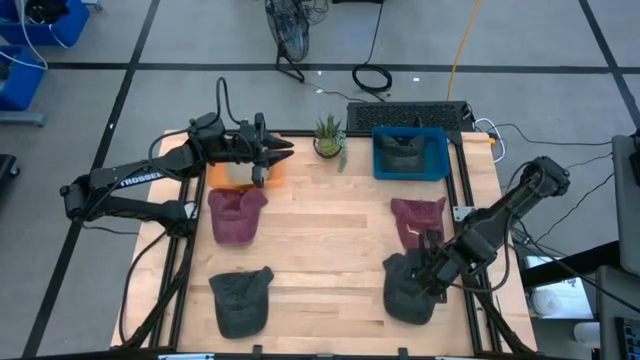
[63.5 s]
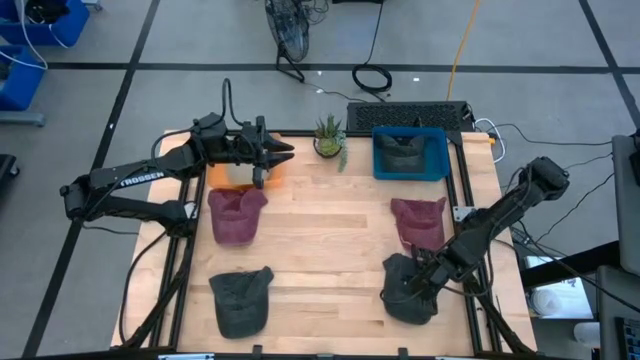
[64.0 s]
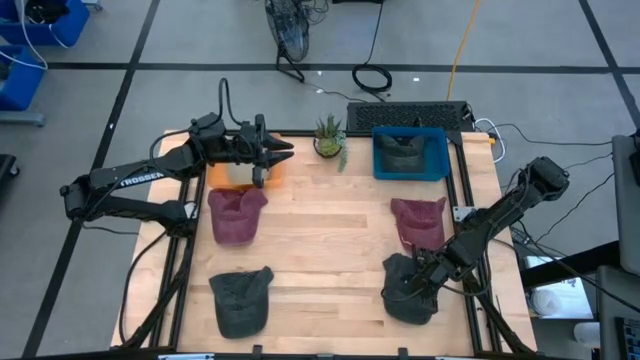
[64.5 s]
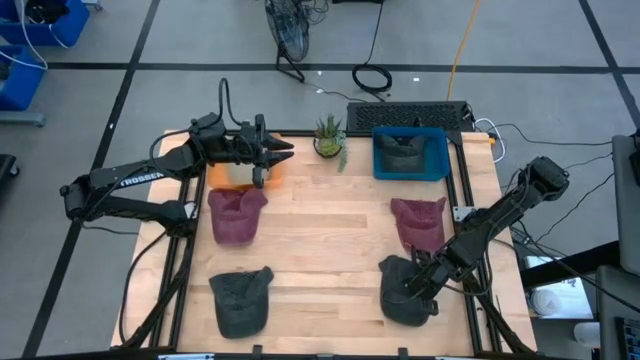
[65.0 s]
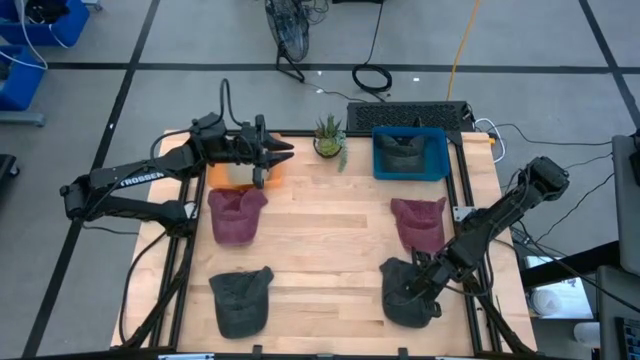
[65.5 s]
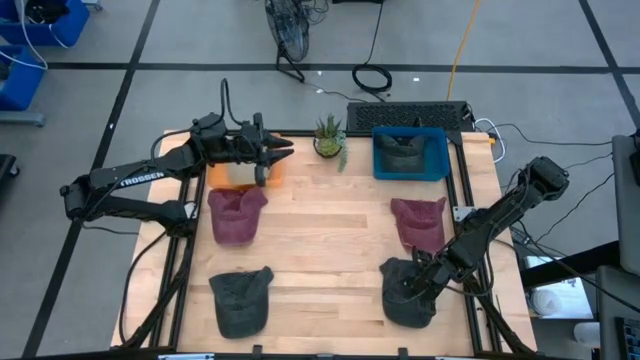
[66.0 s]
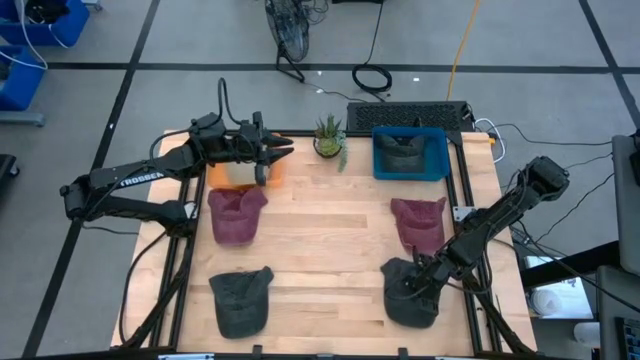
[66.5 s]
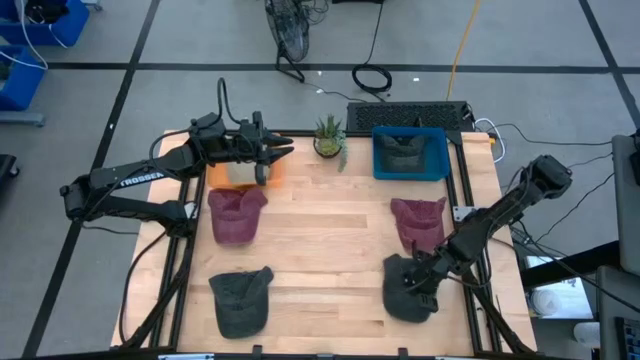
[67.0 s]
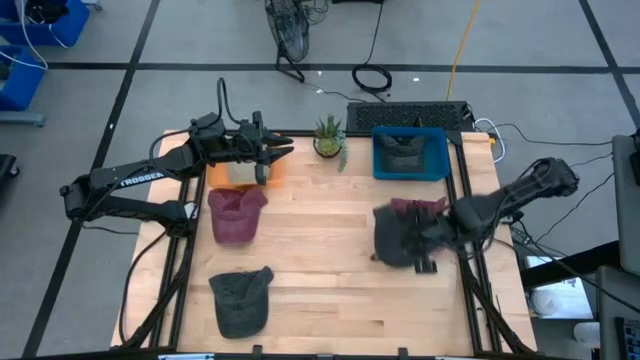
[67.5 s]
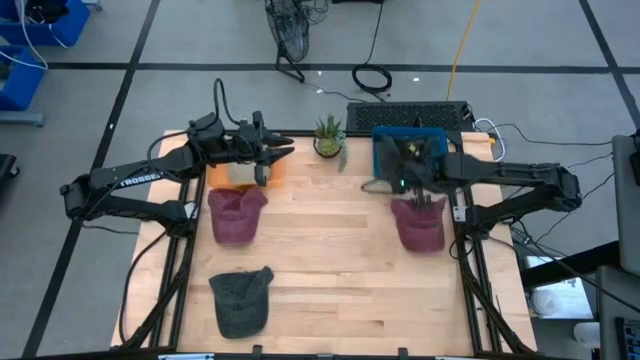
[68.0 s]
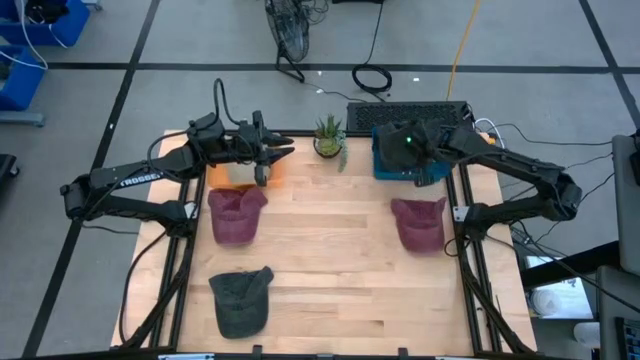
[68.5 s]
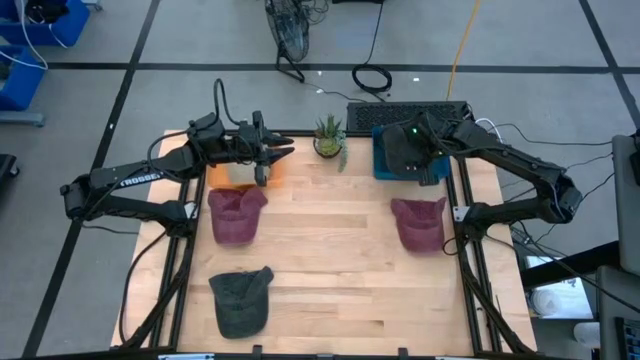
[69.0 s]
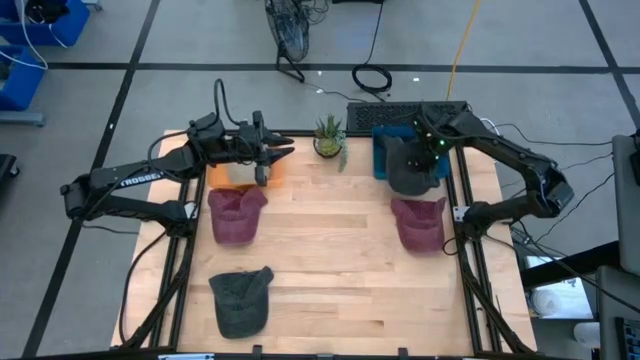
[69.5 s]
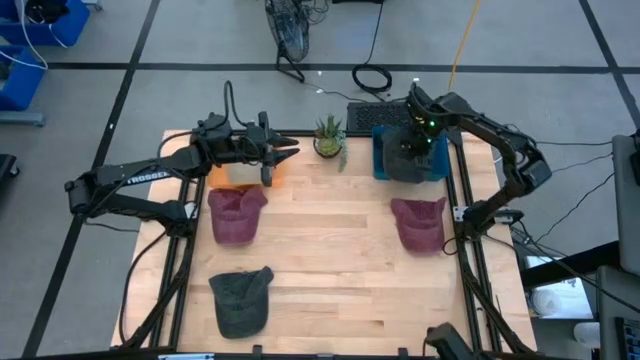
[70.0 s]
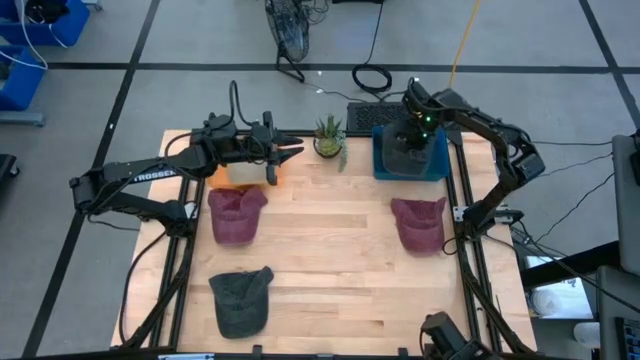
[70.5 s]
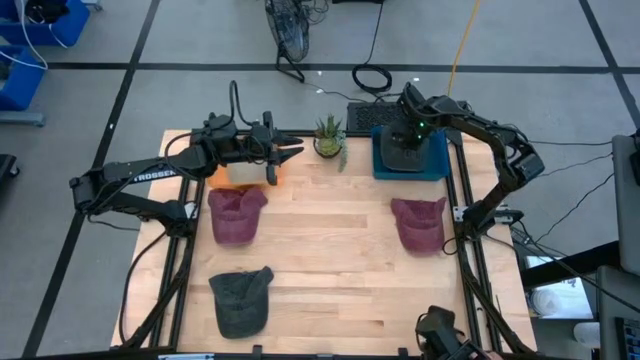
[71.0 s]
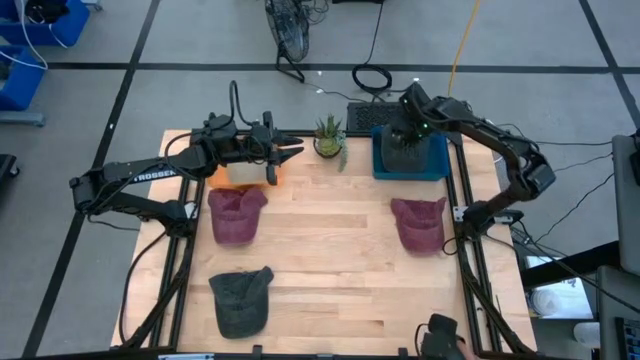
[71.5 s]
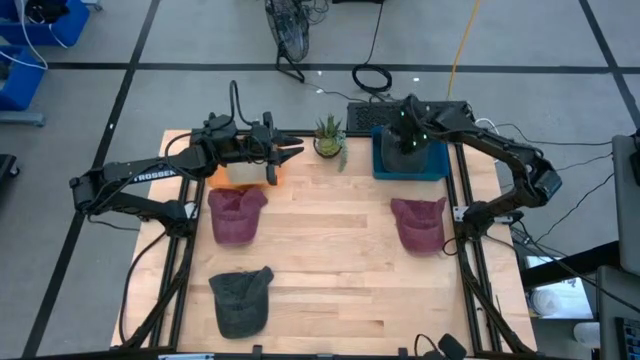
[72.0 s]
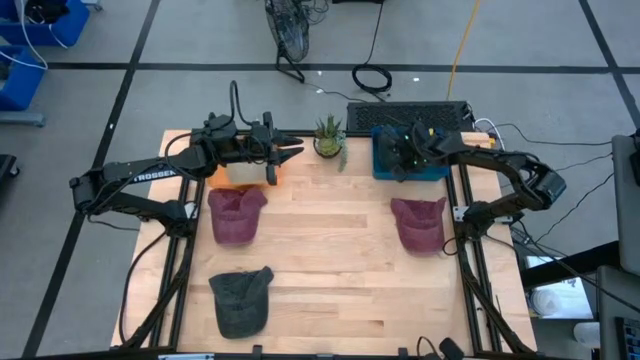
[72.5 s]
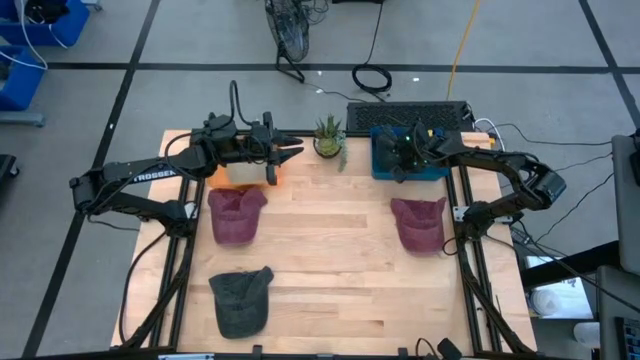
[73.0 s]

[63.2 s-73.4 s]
Task: Pick & Place hat
Put the right black cap into the blue bin

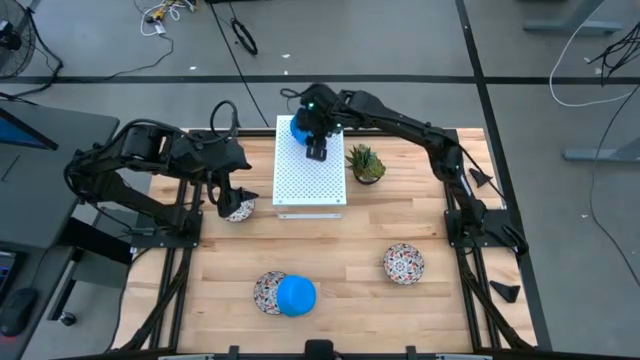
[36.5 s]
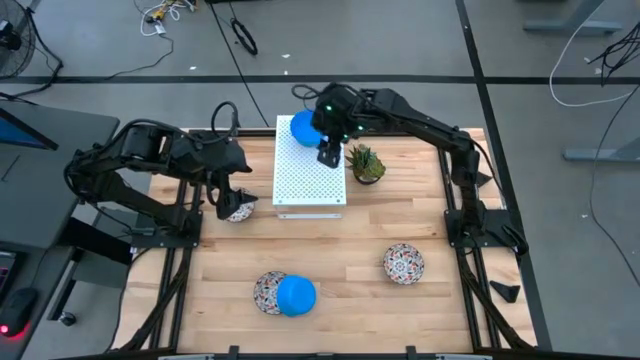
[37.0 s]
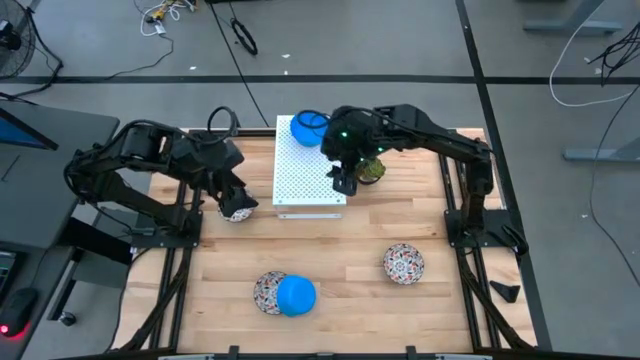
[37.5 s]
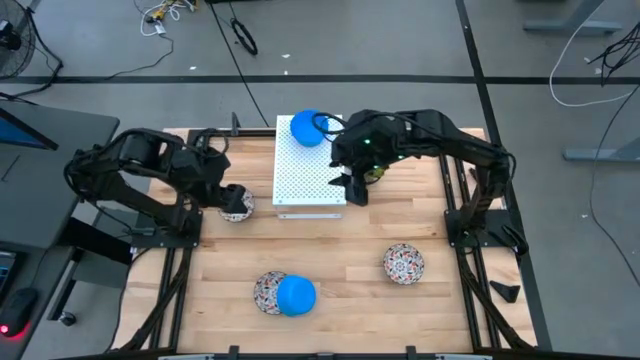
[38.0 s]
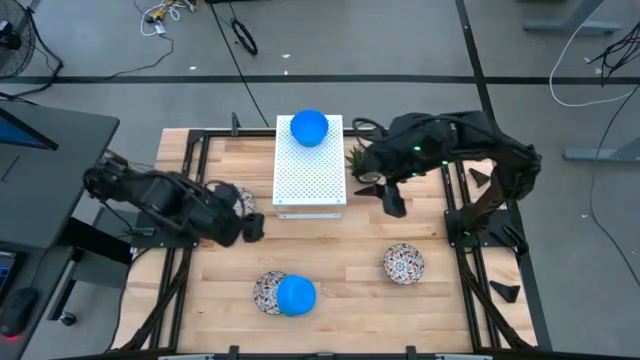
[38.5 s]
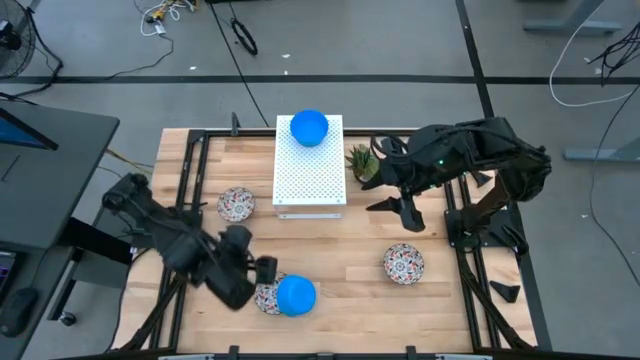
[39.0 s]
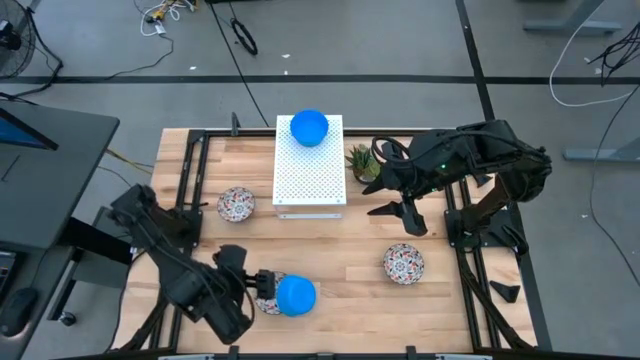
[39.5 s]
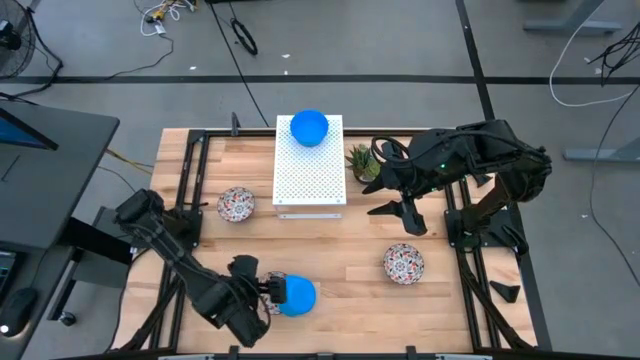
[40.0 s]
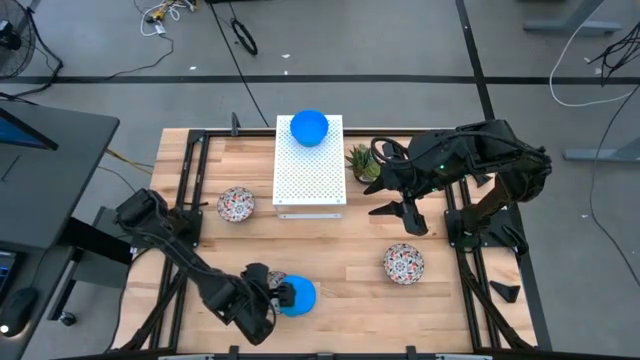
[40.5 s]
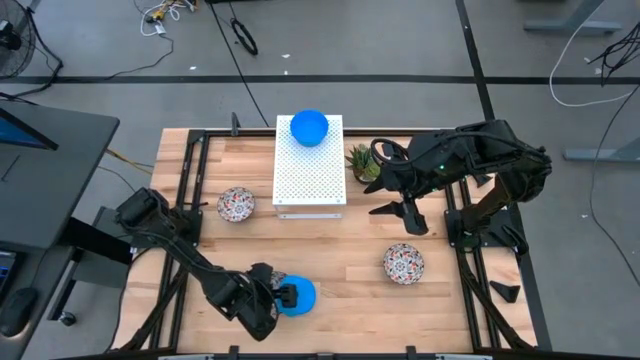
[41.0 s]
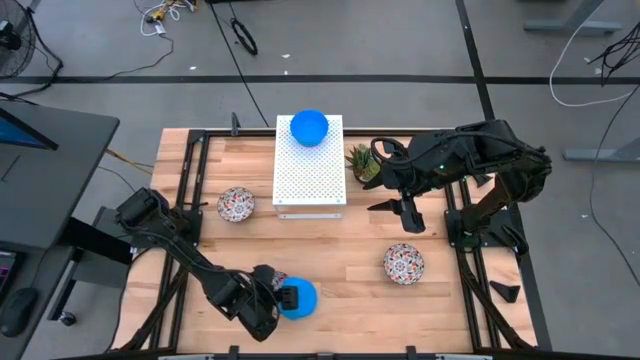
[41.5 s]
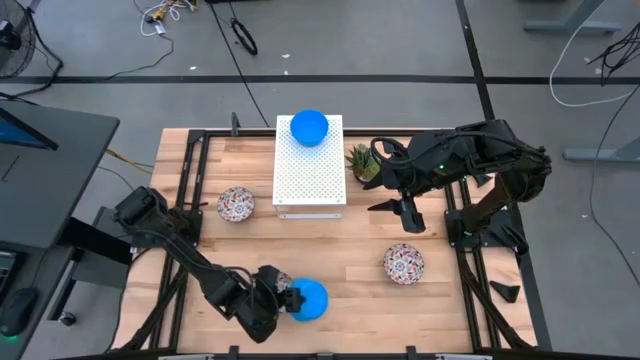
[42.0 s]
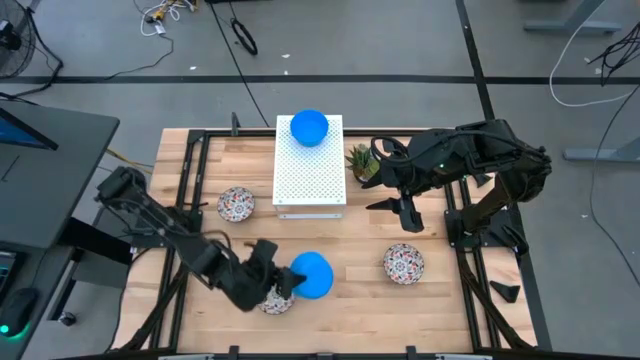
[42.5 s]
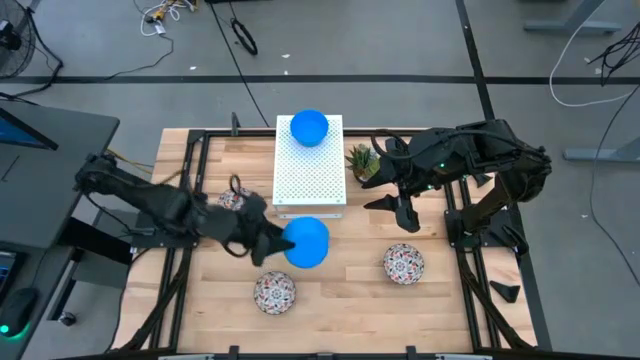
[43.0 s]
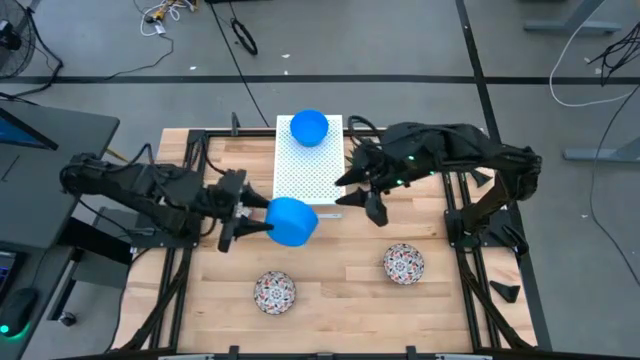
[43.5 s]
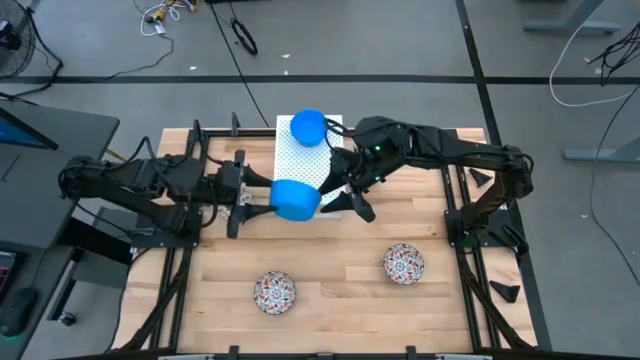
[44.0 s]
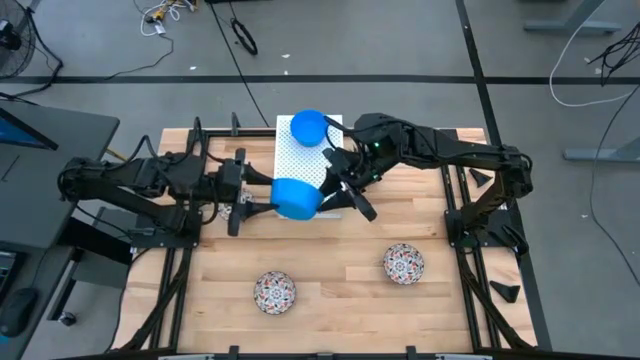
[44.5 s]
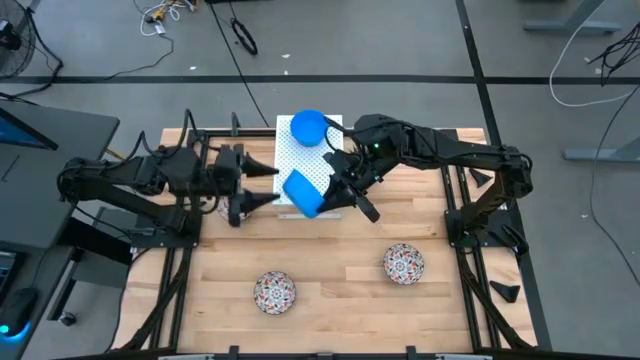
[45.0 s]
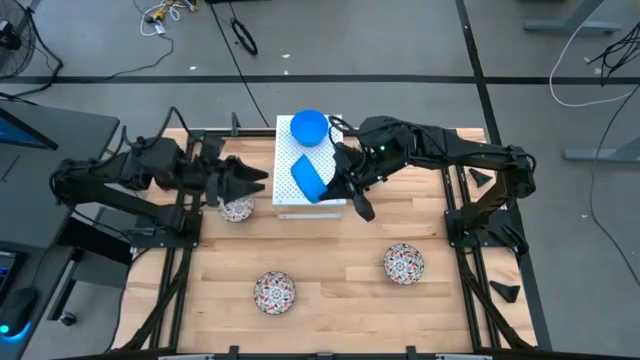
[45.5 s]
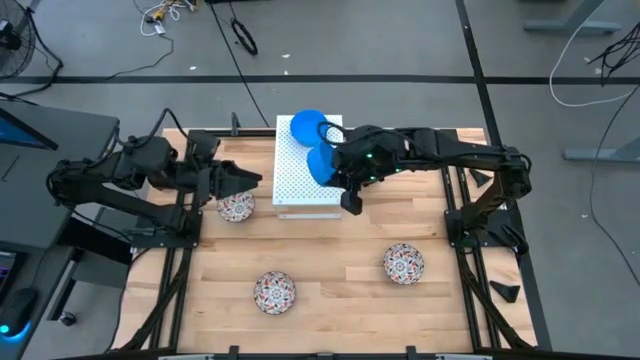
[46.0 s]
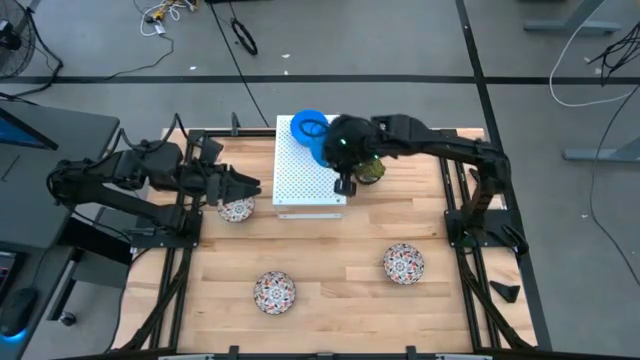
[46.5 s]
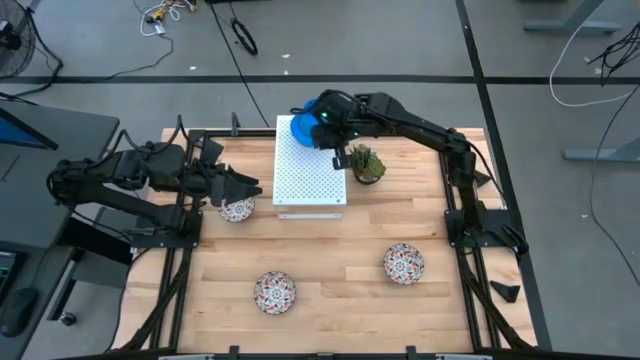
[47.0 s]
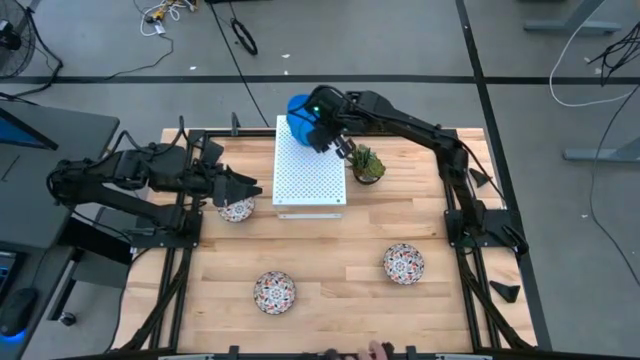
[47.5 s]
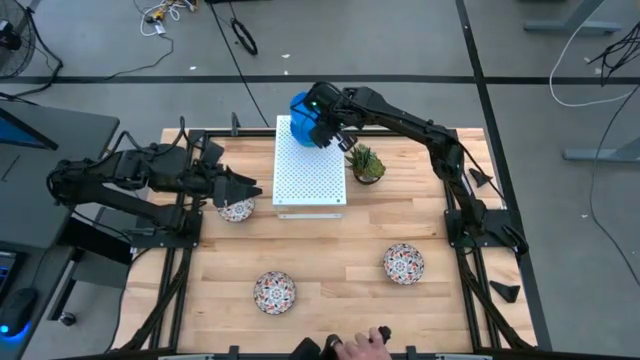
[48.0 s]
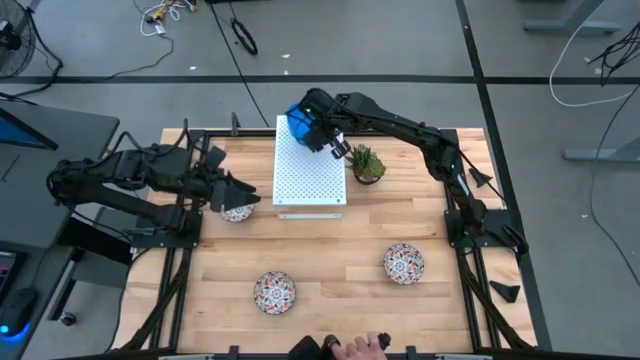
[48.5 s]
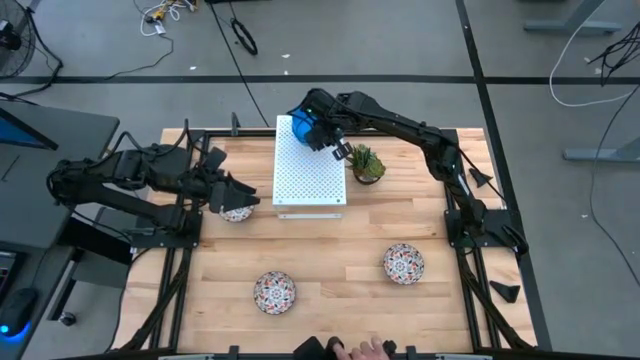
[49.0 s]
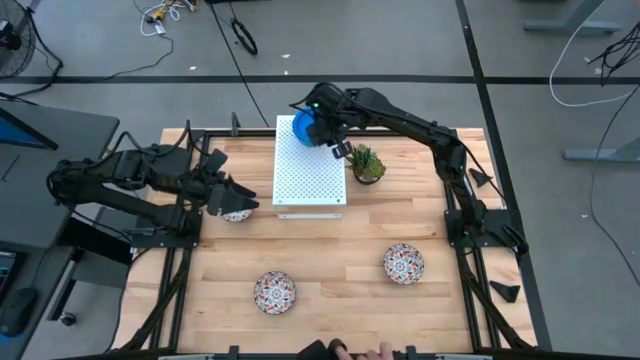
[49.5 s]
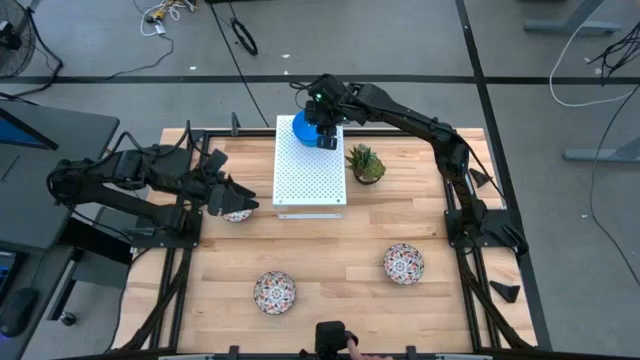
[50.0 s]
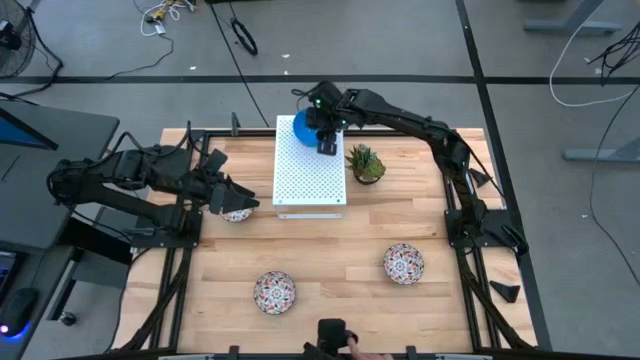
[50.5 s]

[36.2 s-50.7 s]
Task: Pick & Place Mini bowls
Stack the blue bowl on top of the blue bowl on the shelf
